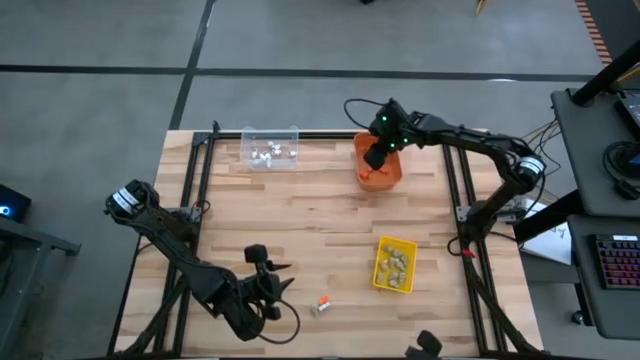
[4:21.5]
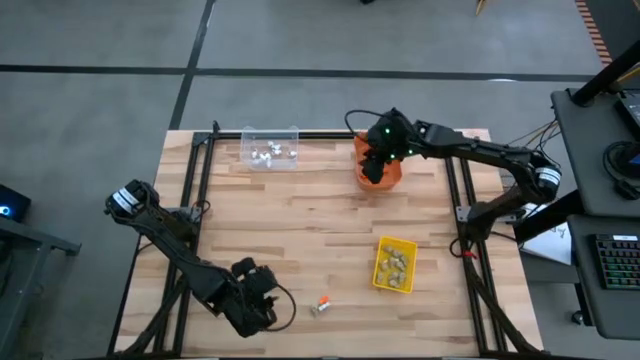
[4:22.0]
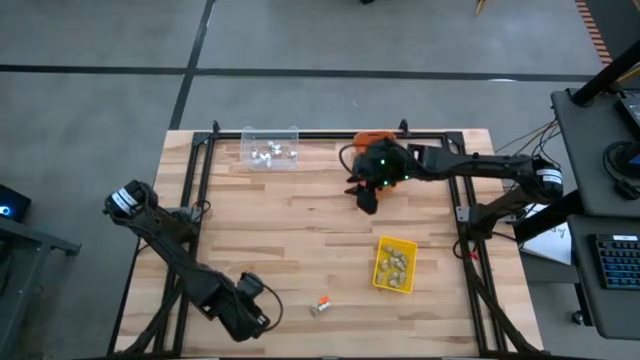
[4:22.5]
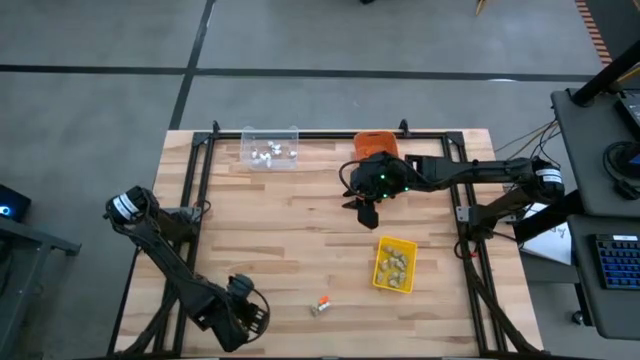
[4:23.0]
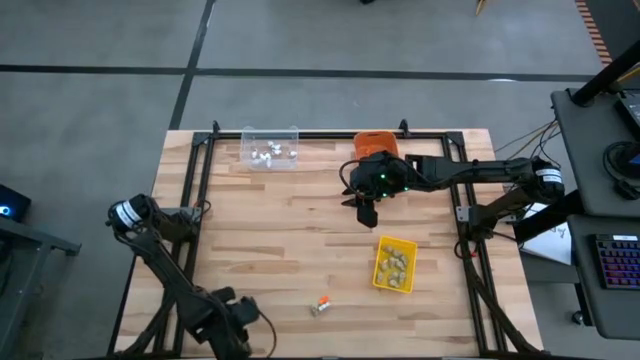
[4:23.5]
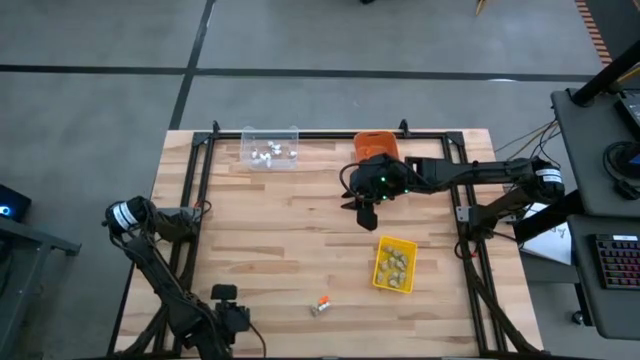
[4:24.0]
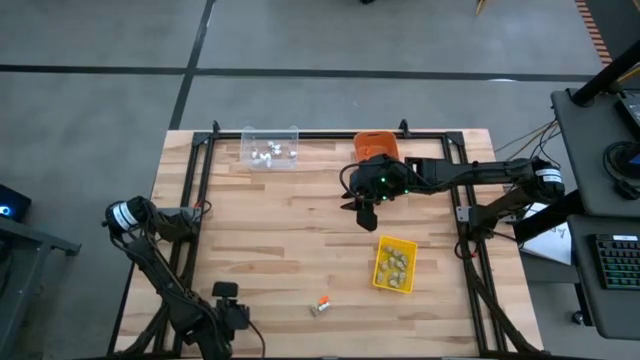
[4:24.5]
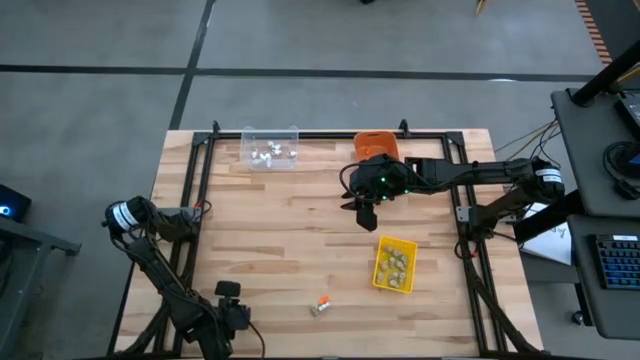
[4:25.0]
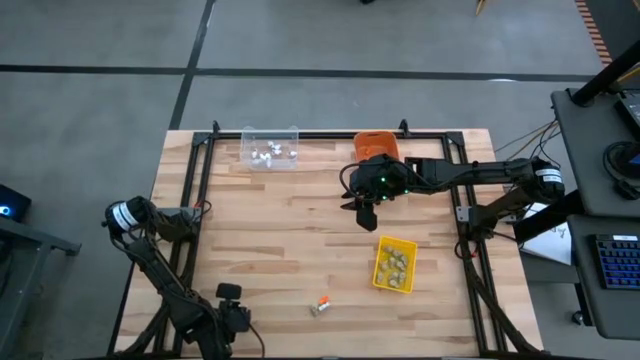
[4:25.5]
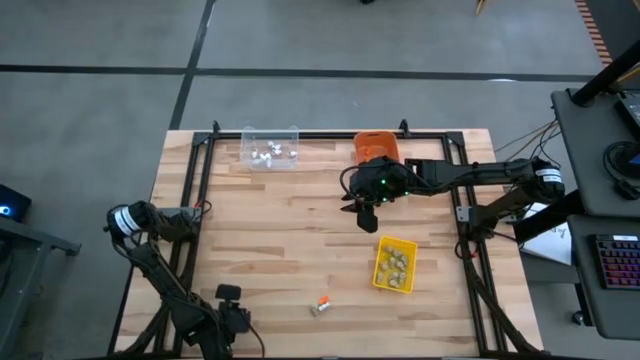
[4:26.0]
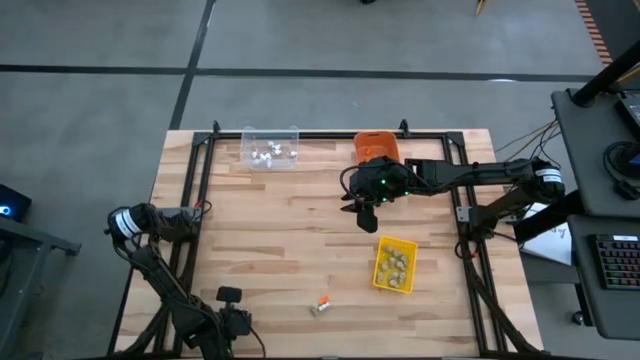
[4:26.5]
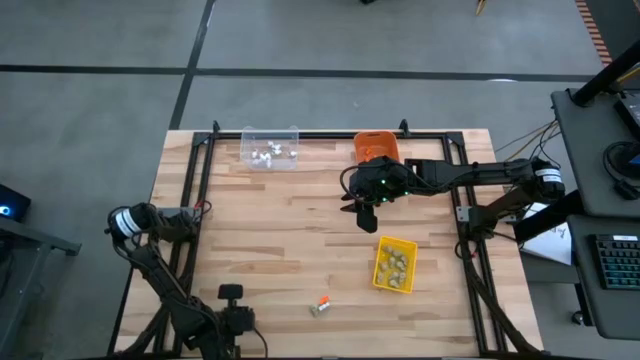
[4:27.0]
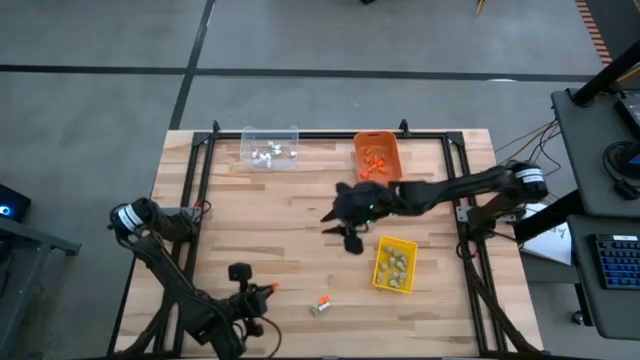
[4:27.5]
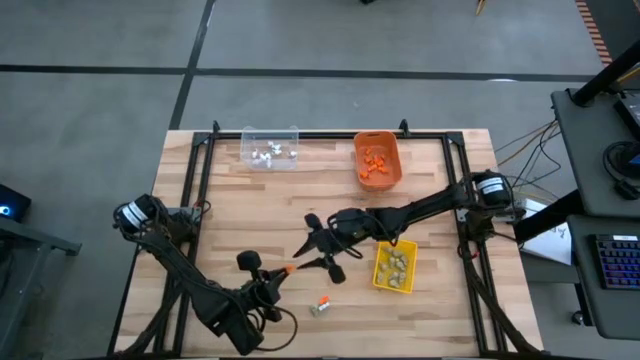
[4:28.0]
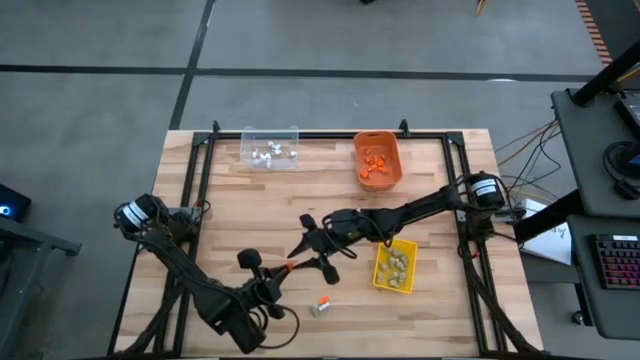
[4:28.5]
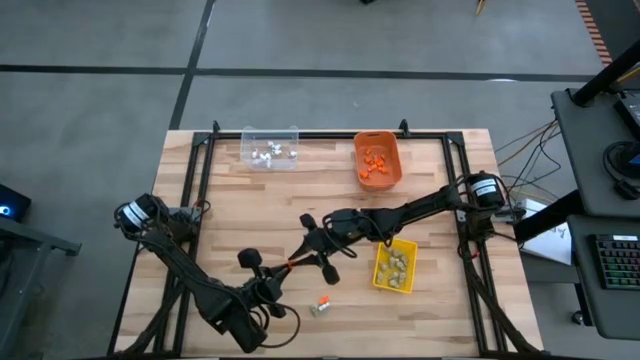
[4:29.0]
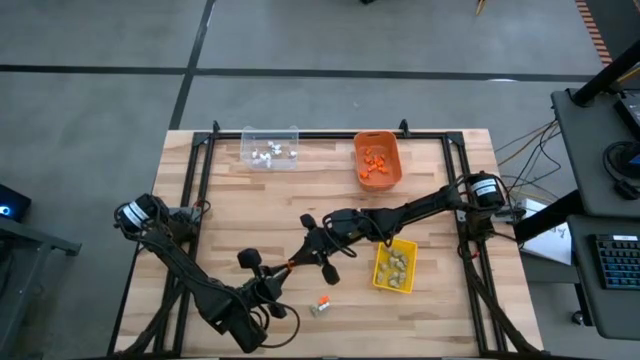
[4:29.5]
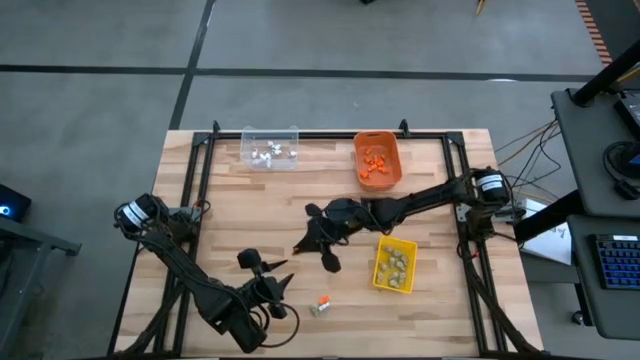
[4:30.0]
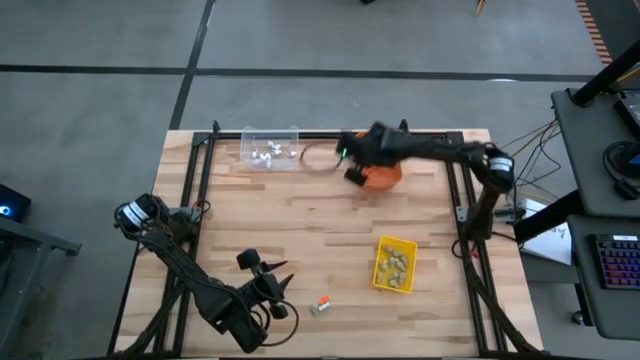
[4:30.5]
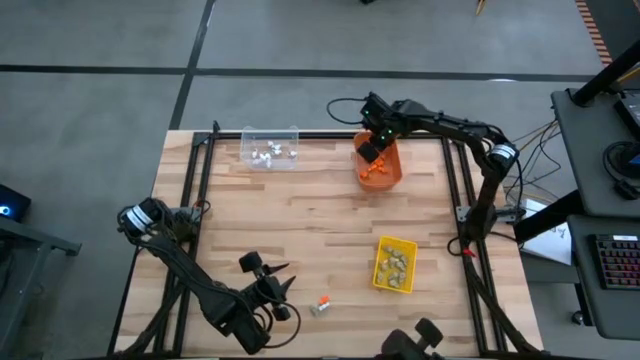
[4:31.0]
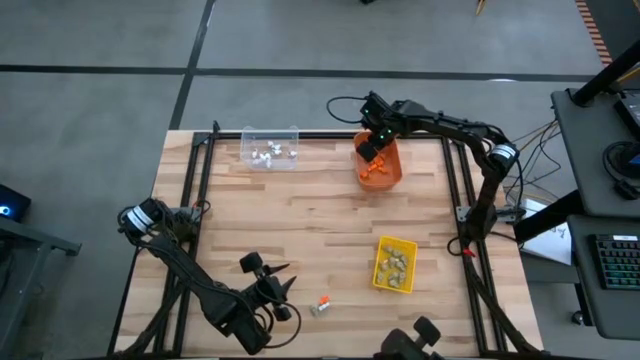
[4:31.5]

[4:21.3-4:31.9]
Task: Sort Halloween decoration
Put the orange skeleton toy into the yellow bin

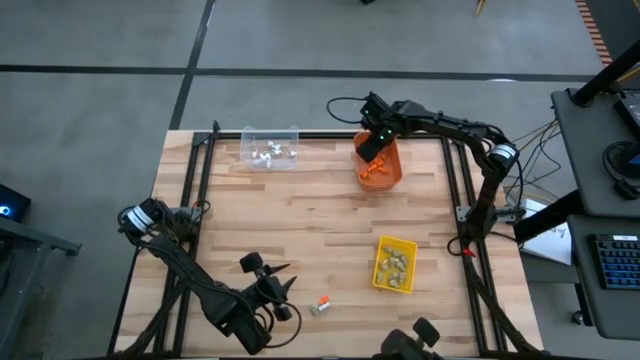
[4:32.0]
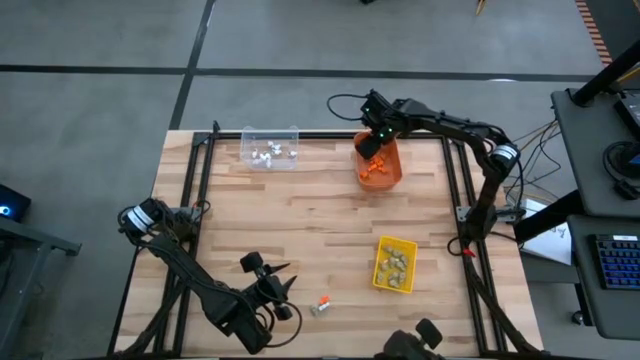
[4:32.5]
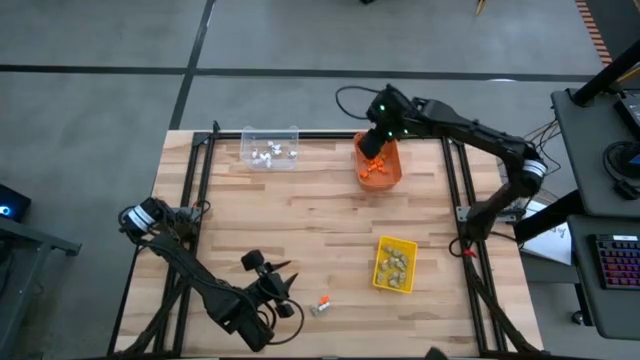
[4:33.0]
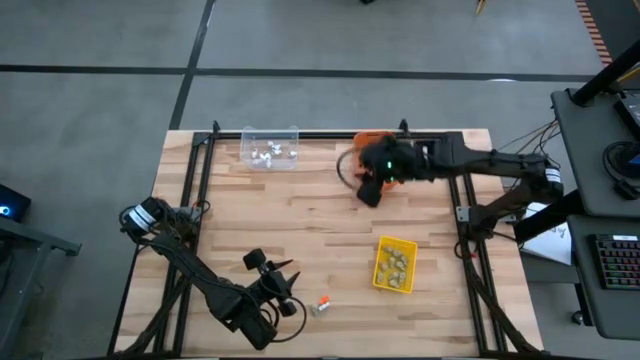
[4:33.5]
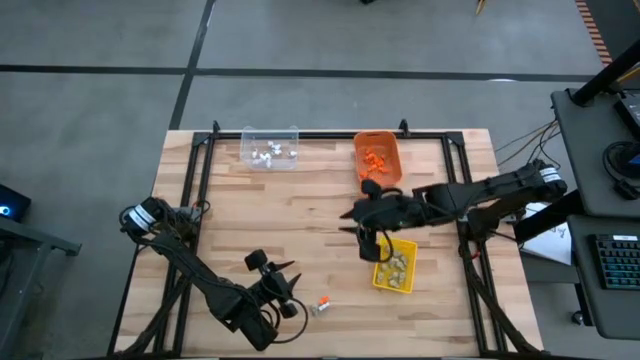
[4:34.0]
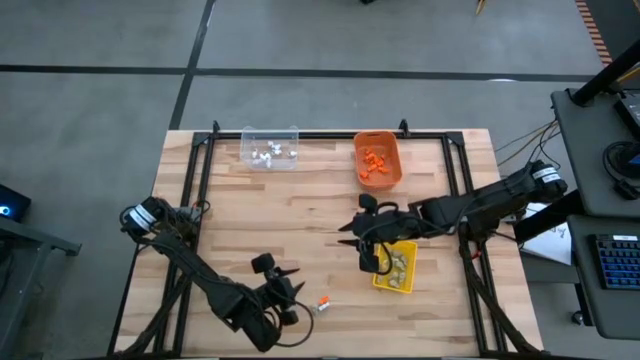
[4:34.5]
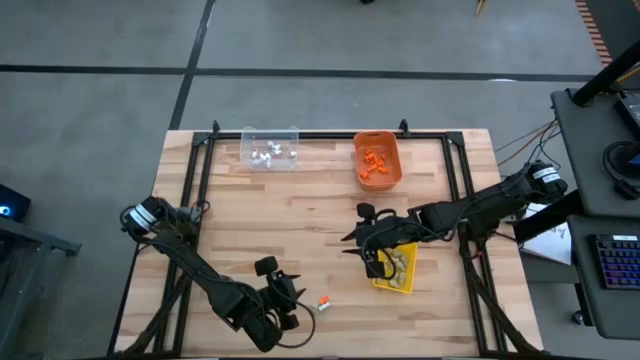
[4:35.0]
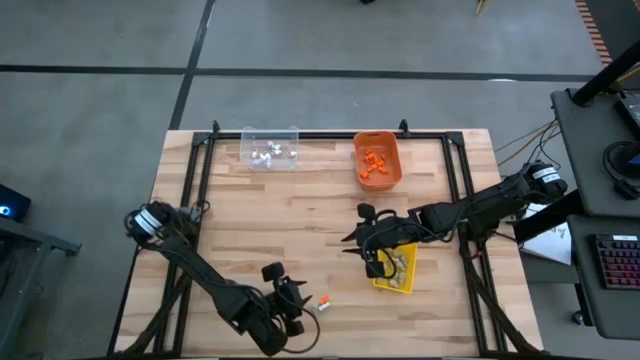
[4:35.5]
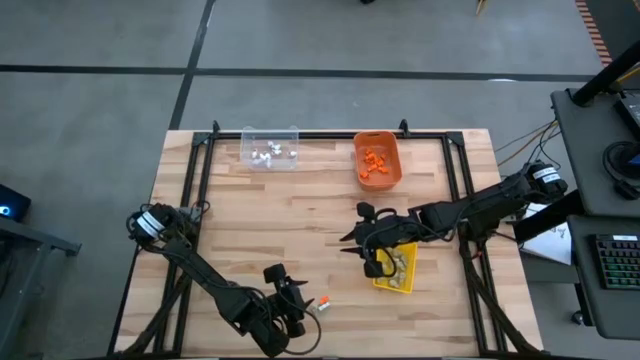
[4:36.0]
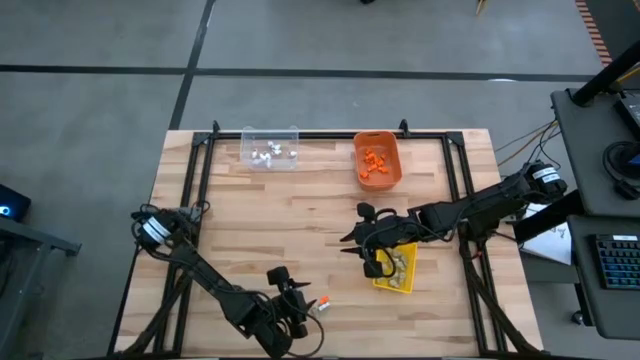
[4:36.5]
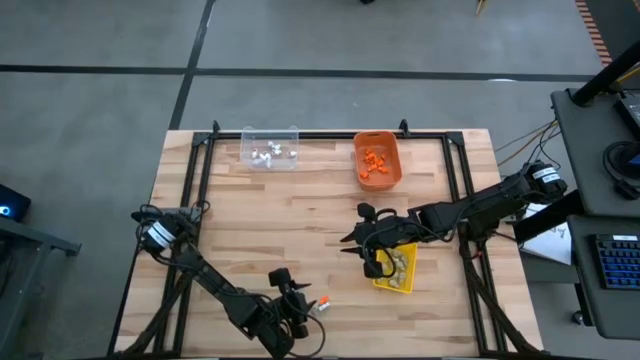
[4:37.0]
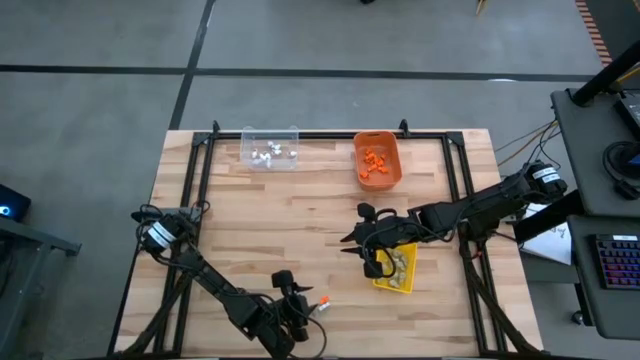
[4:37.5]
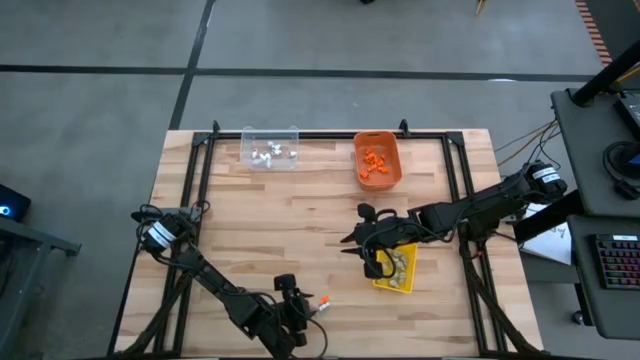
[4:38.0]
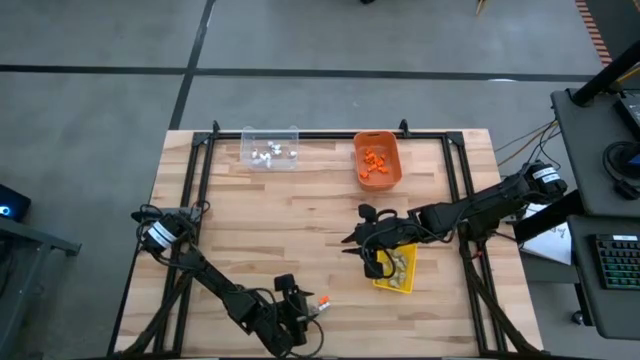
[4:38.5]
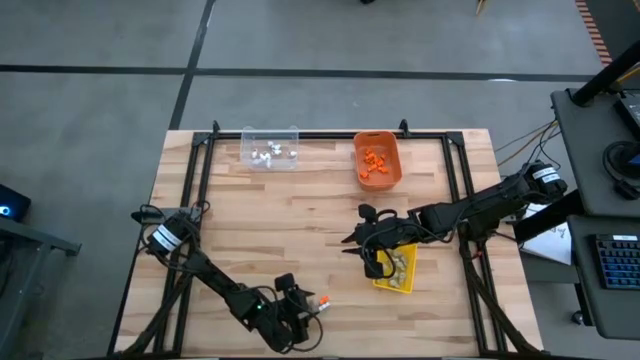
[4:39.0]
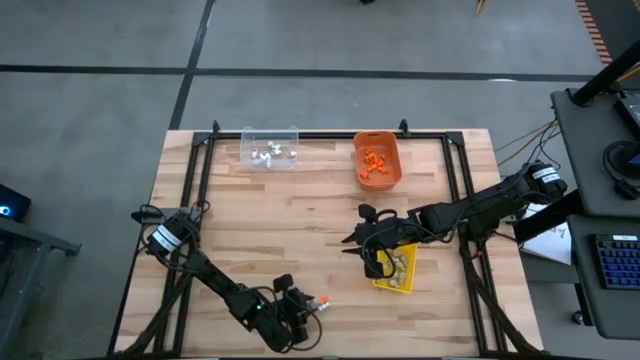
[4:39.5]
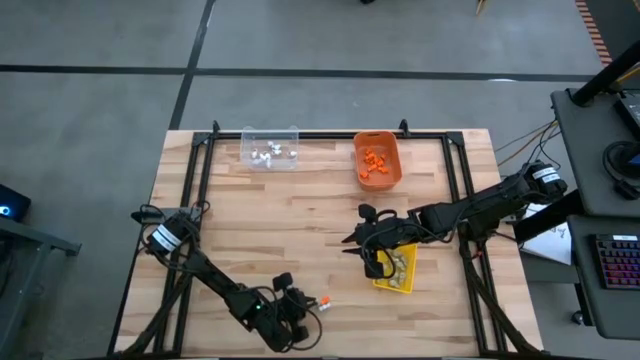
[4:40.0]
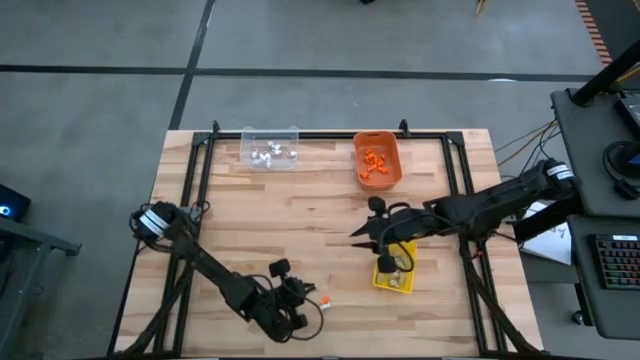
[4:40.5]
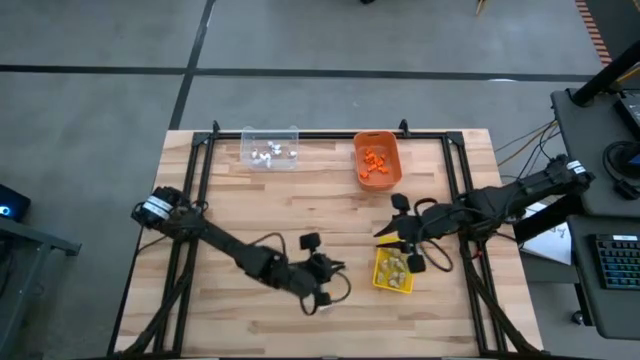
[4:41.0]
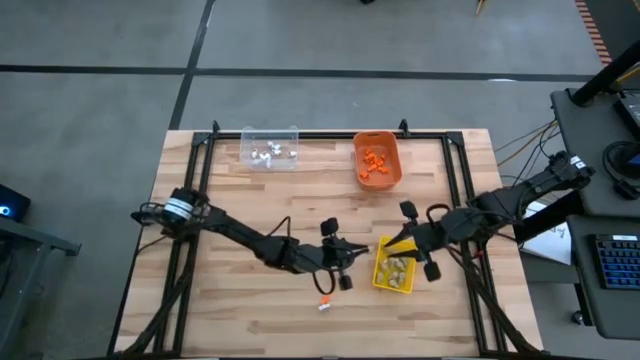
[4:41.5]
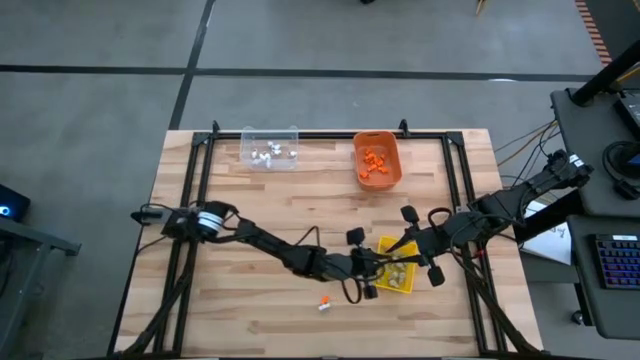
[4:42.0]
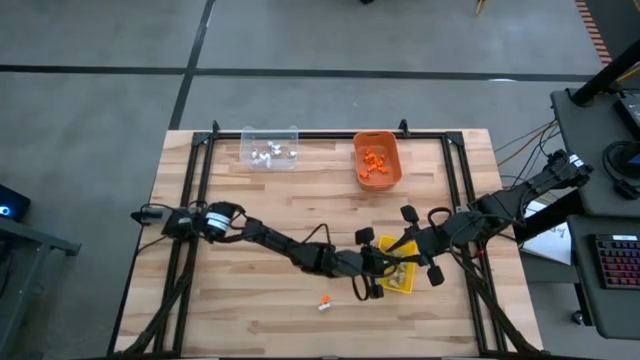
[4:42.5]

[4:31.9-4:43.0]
Put the gray skull toy into the yellow bin
